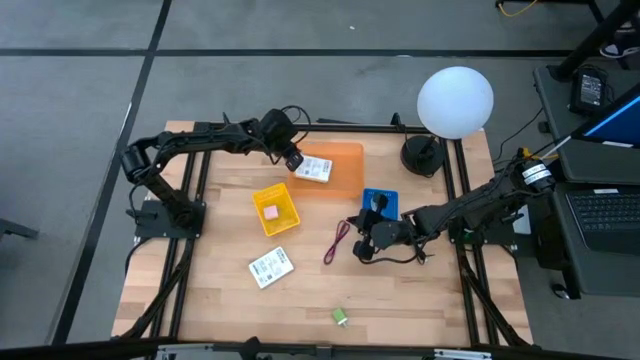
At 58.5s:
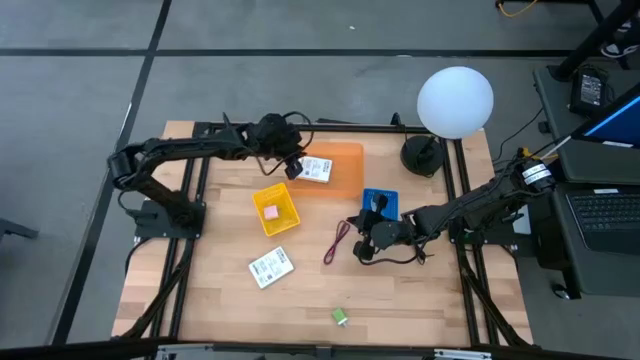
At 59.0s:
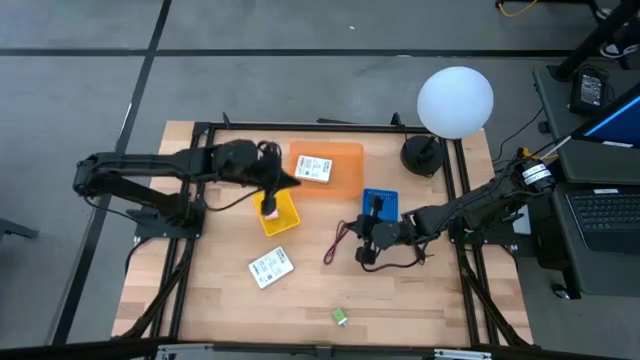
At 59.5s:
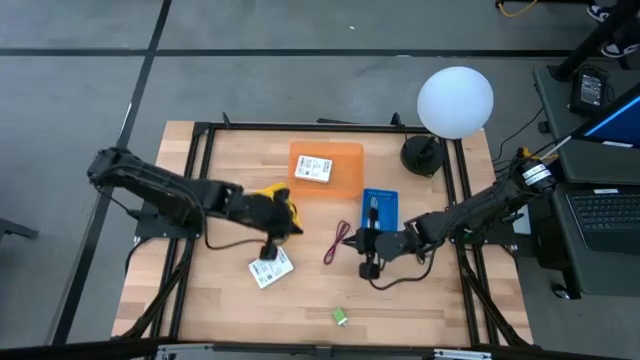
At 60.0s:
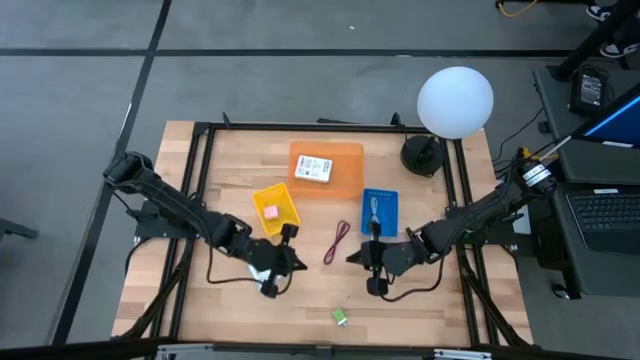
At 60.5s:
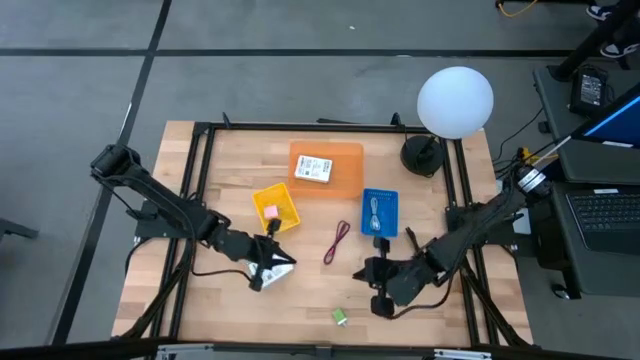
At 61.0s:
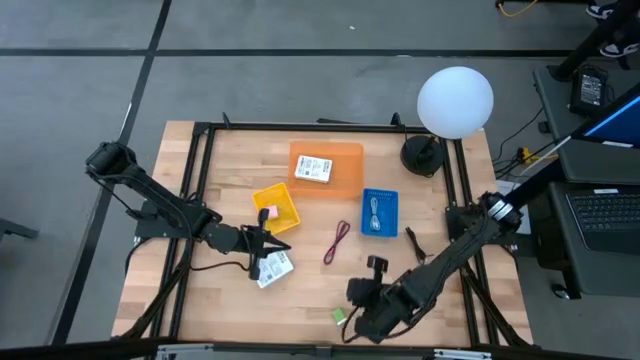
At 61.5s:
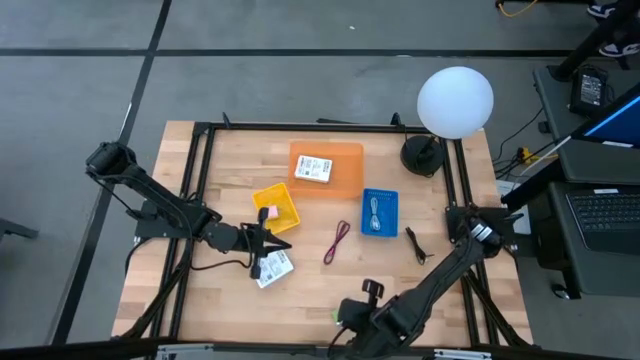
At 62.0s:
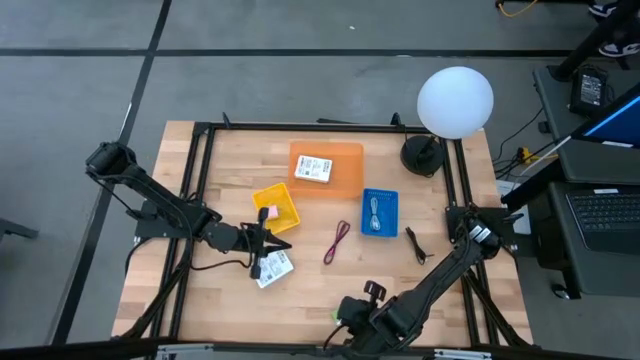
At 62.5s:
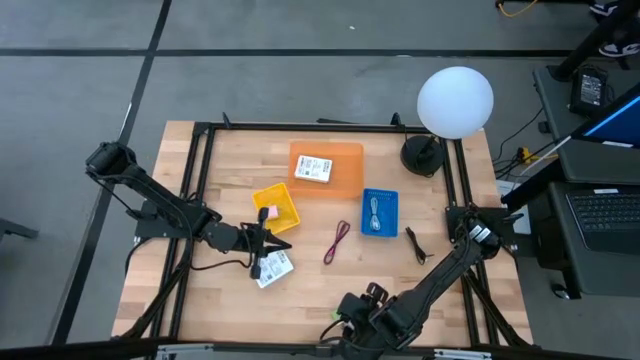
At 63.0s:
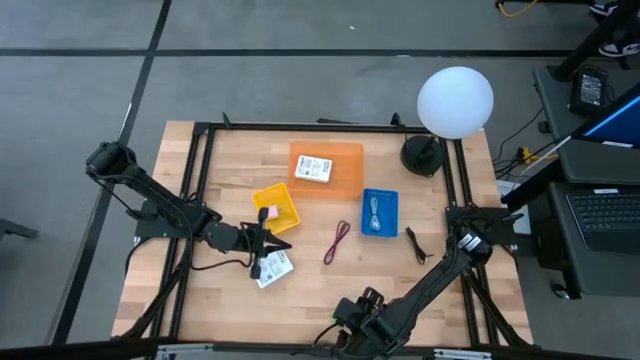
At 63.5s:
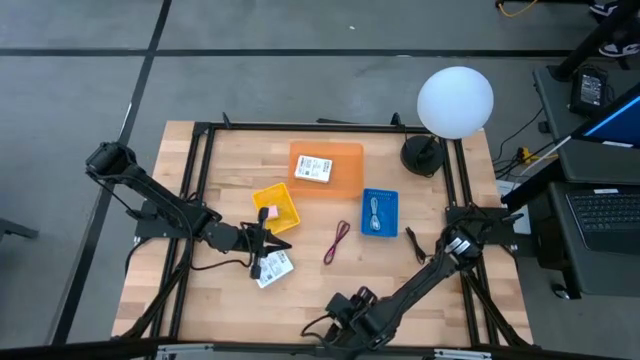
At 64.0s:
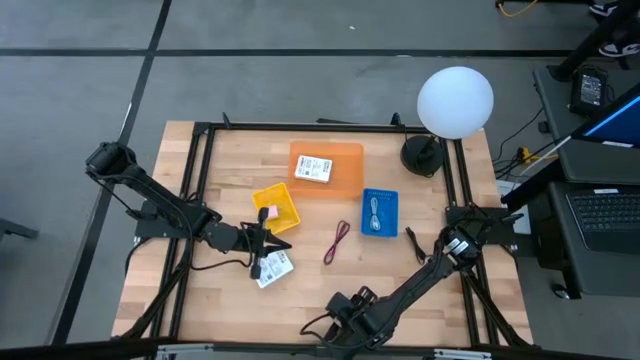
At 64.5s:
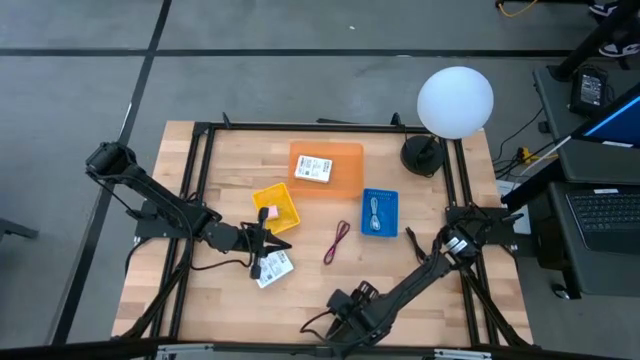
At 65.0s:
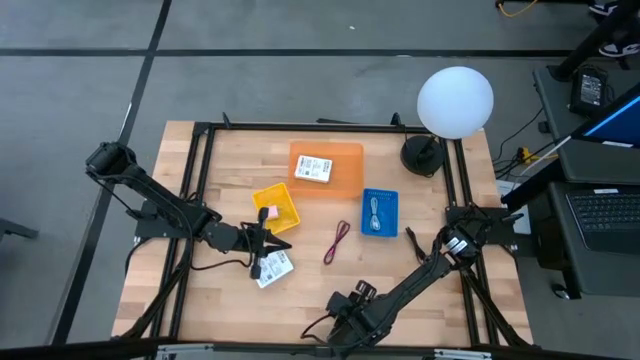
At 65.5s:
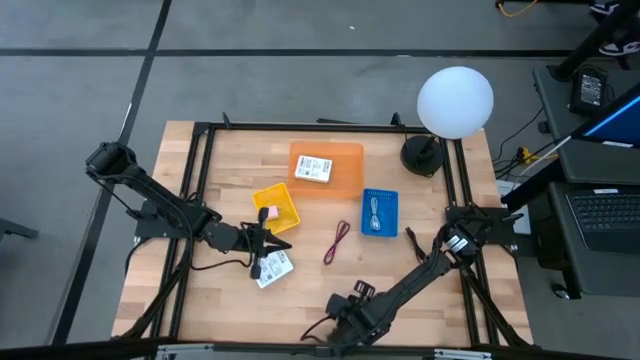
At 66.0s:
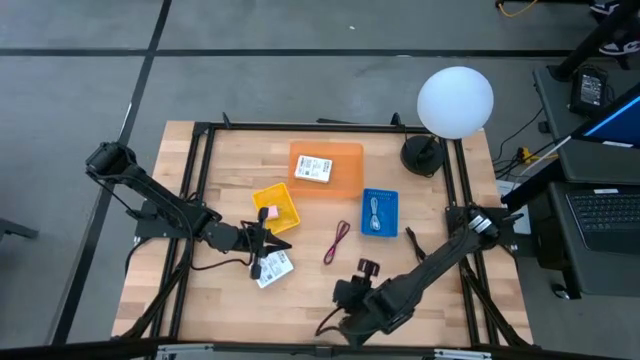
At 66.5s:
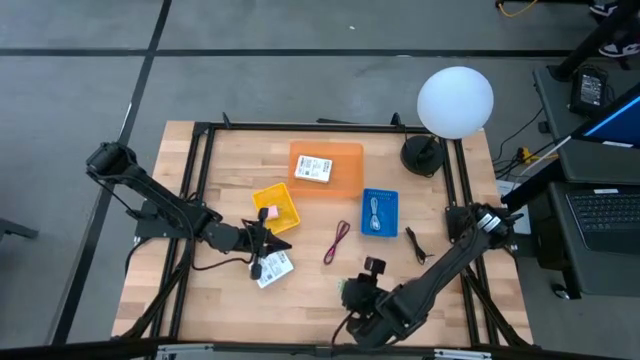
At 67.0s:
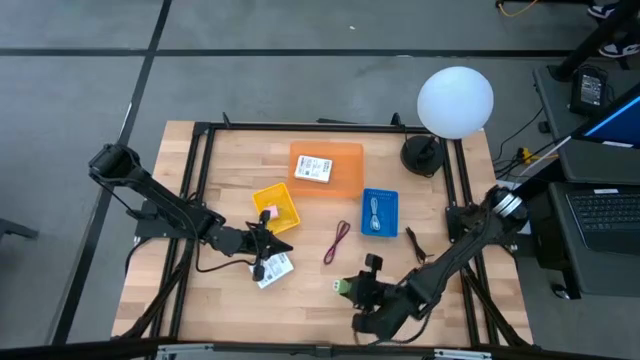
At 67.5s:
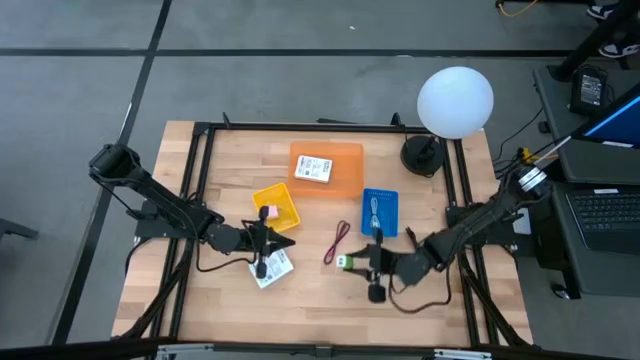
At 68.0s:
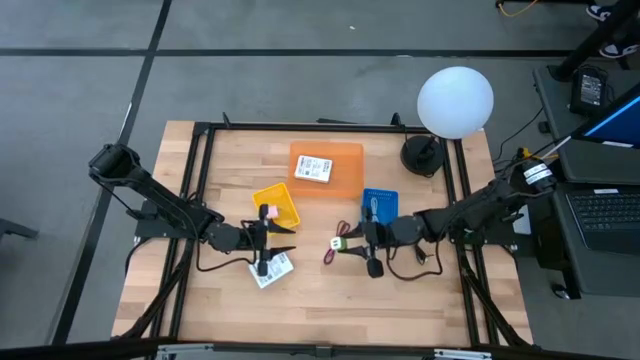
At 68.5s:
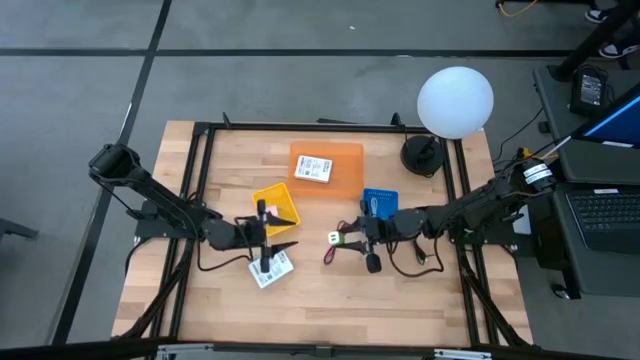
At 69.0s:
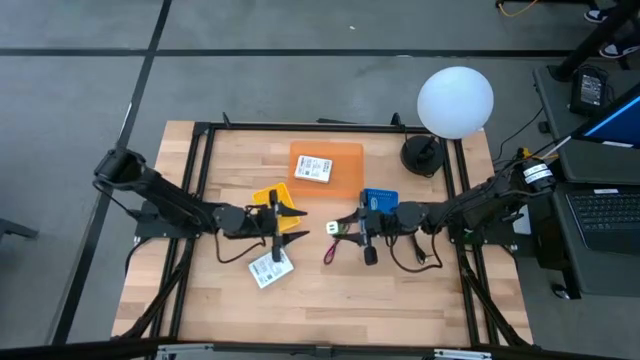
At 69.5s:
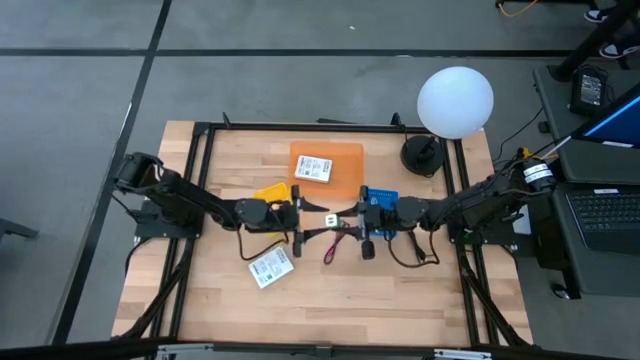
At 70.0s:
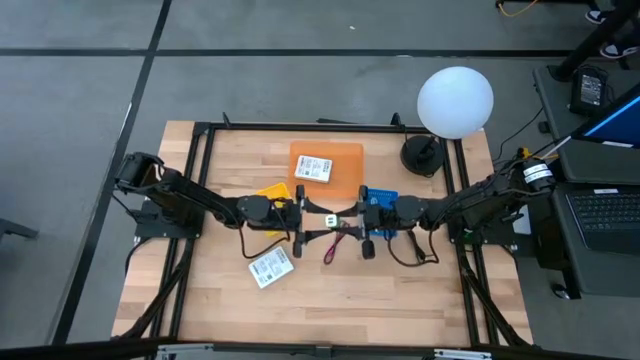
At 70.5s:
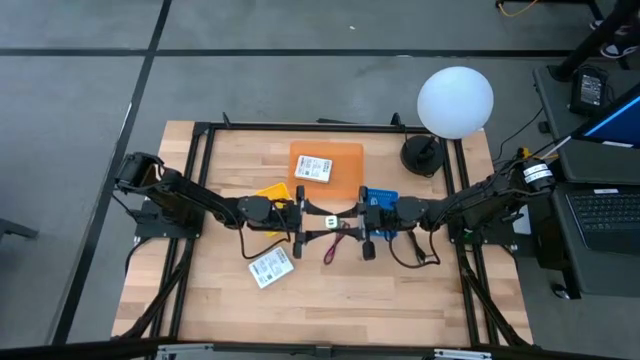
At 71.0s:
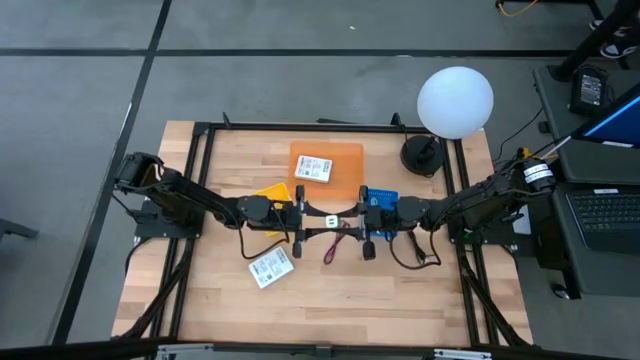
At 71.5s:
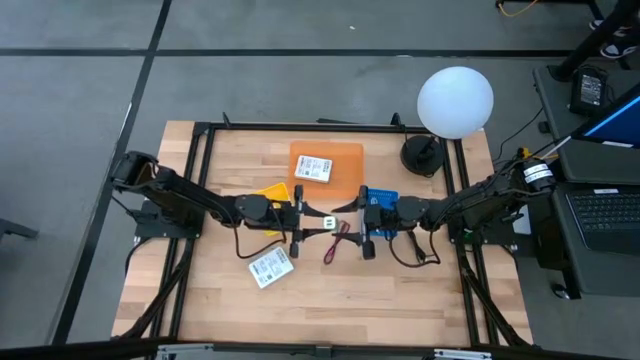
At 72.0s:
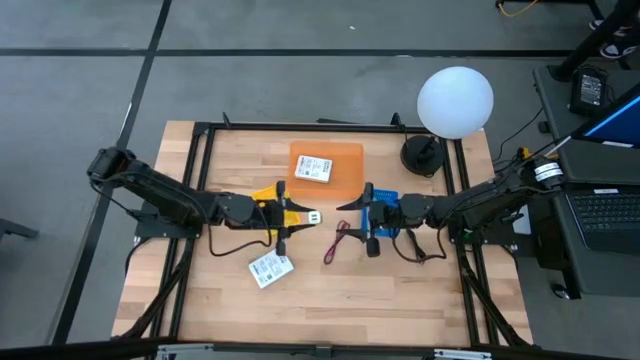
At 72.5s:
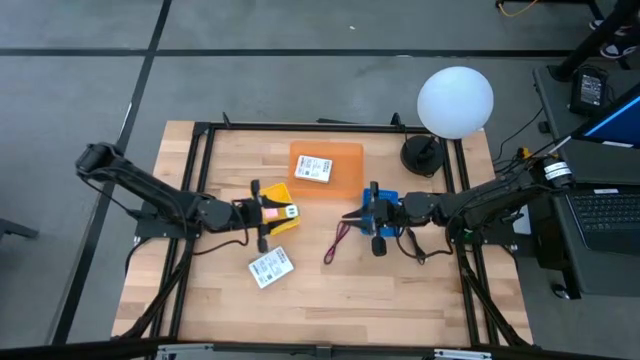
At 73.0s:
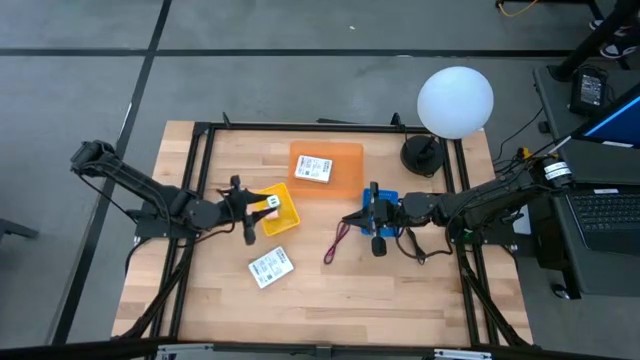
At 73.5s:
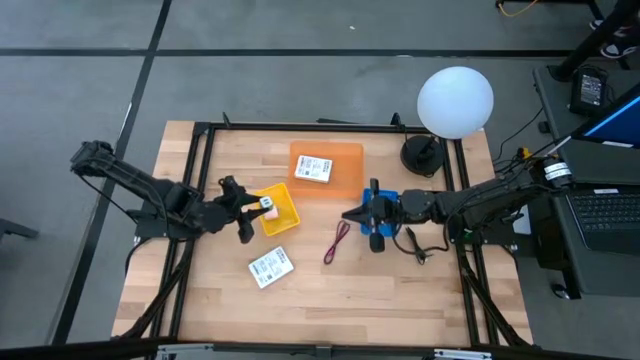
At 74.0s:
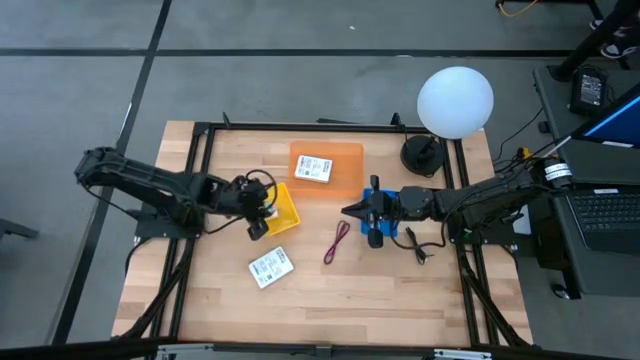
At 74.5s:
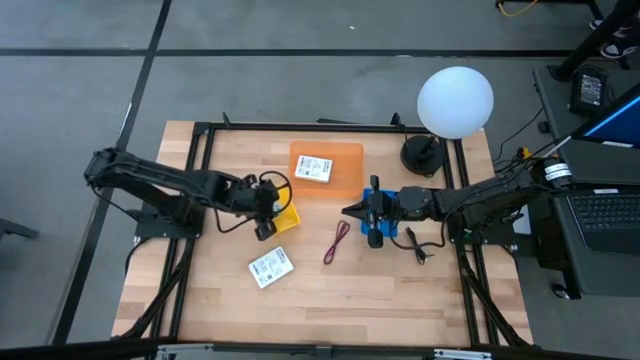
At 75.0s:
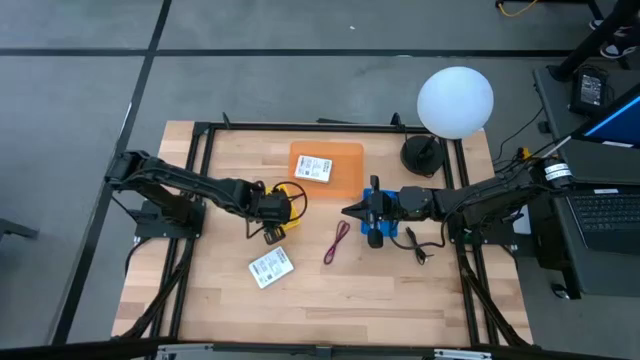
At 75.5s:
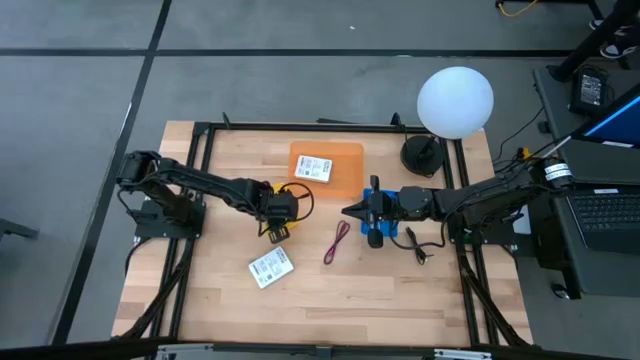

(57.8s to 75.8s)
Task: Pick and place items into bin
Put the green charger adapter into the yellow bin

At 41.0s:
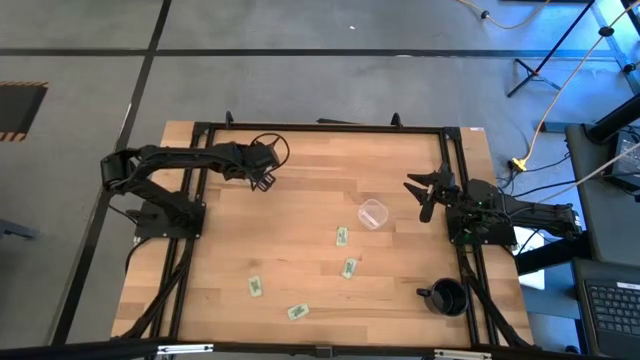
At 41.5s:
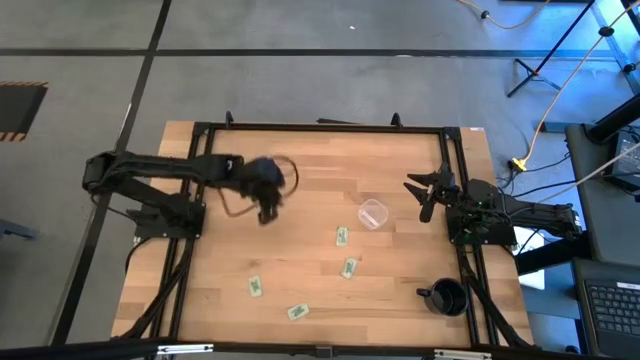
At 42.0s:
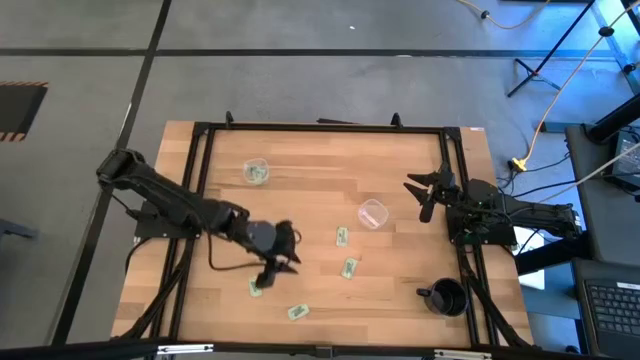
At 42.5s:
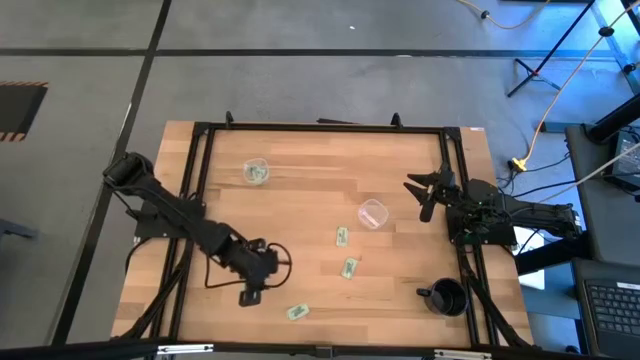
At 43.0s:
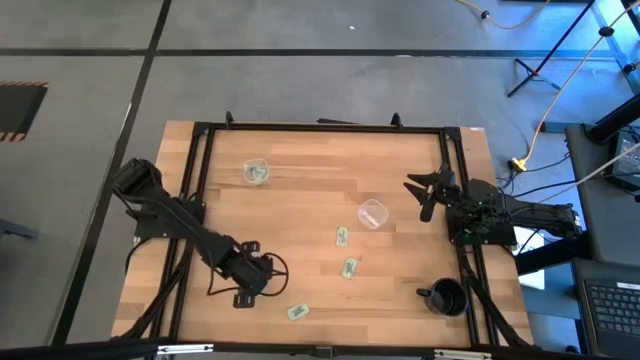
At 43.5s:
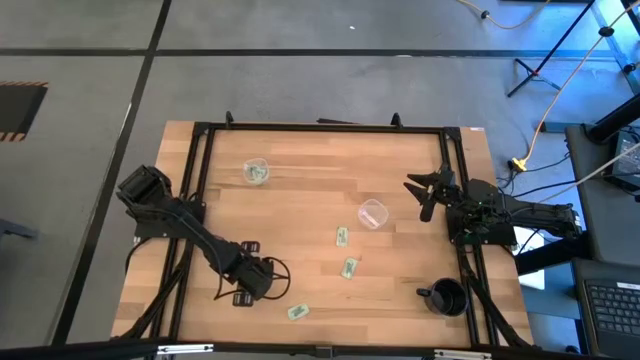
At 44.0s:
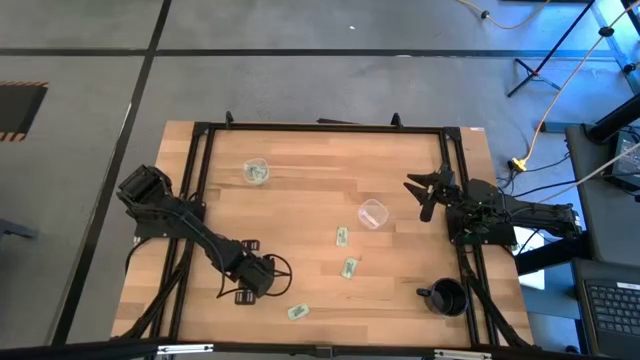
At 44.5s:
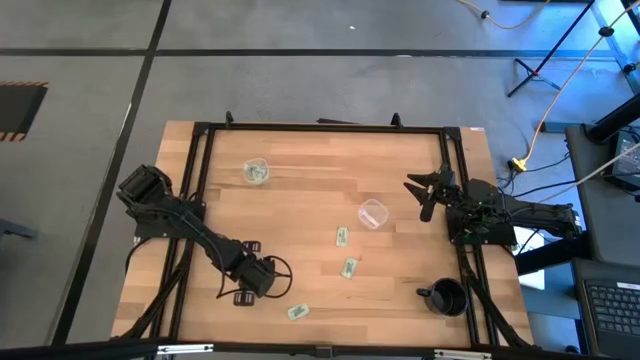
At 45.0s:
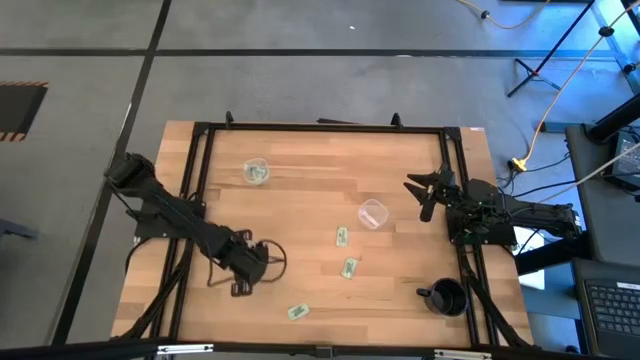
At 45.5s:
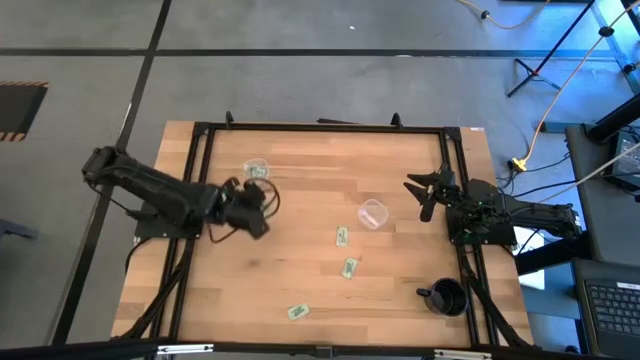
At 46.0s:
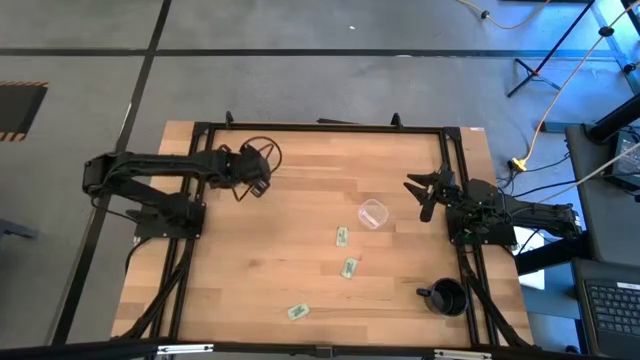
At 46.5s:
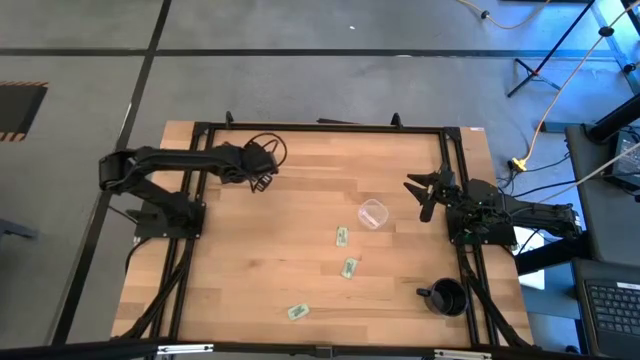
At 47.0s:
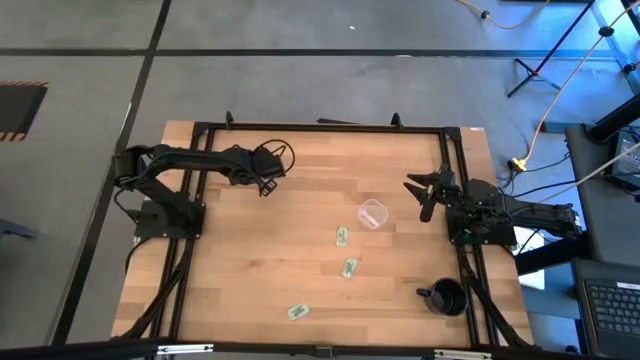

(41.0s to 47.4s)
Task: Pick and place Stevia / Truvia into bins
Put the green stevia packet into the left white container
